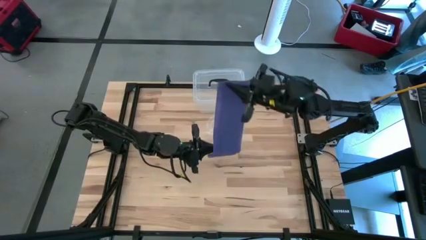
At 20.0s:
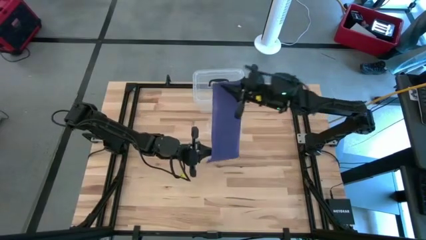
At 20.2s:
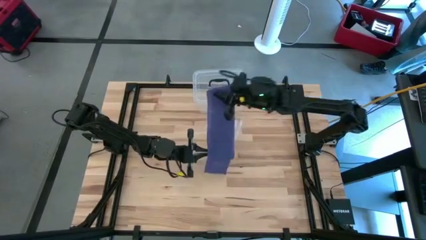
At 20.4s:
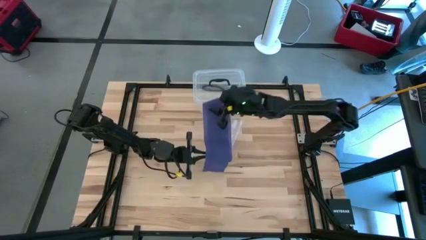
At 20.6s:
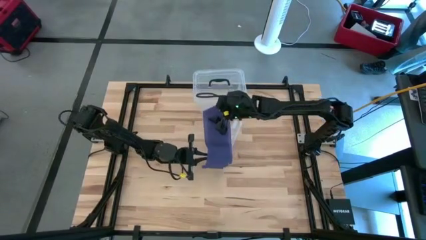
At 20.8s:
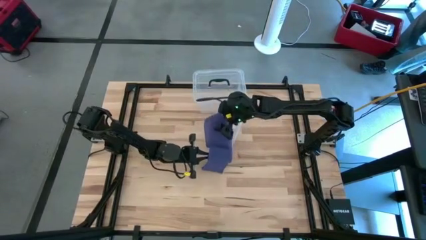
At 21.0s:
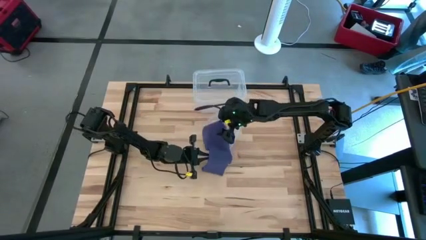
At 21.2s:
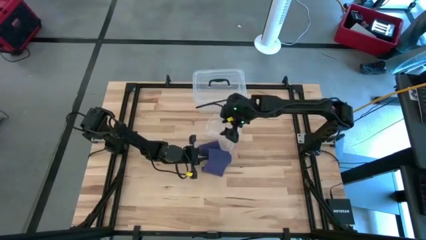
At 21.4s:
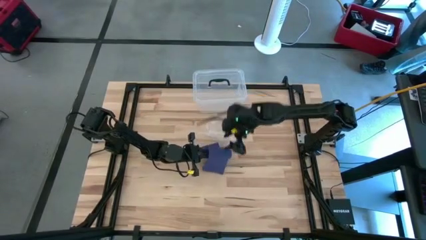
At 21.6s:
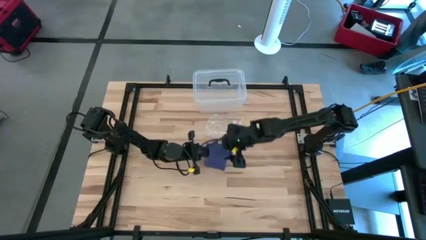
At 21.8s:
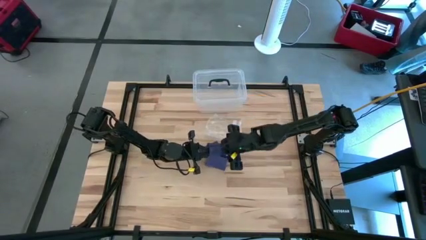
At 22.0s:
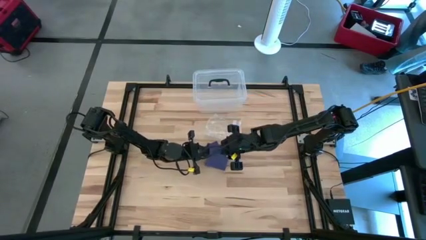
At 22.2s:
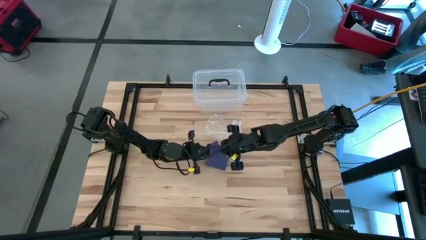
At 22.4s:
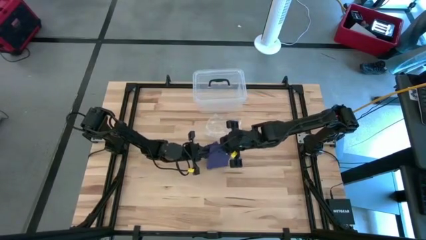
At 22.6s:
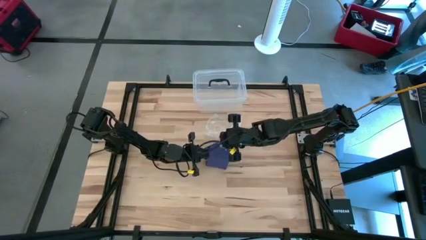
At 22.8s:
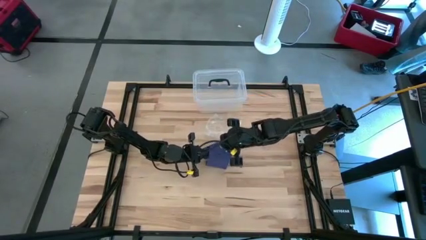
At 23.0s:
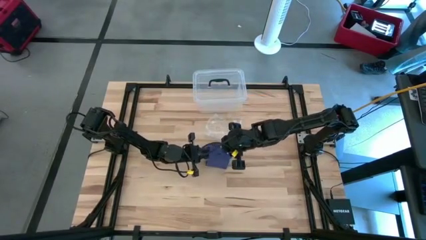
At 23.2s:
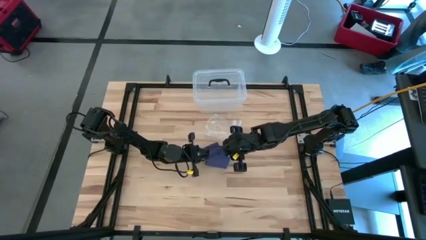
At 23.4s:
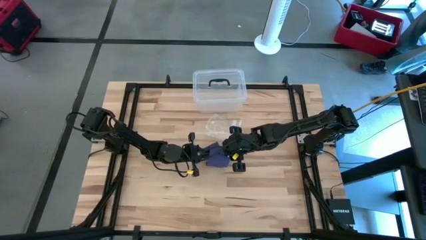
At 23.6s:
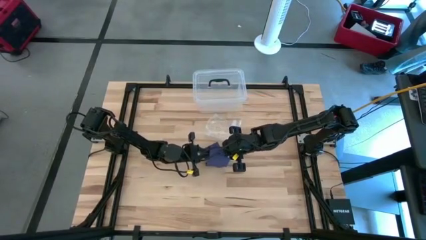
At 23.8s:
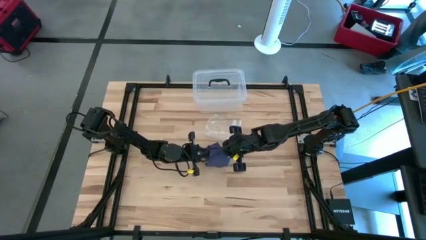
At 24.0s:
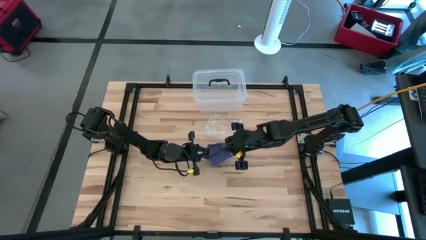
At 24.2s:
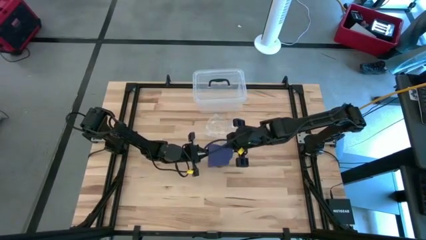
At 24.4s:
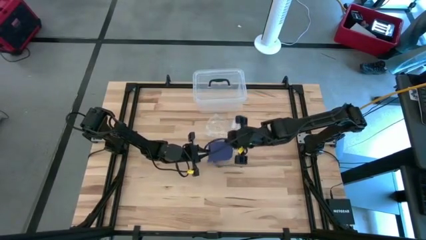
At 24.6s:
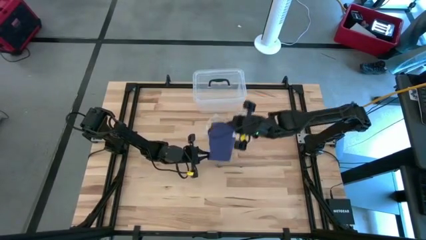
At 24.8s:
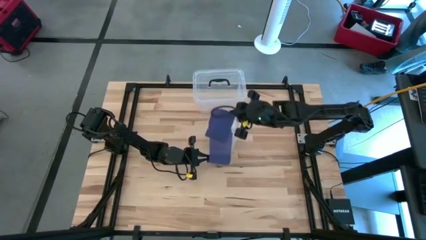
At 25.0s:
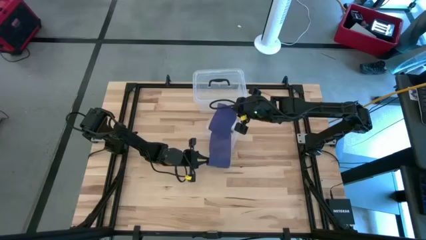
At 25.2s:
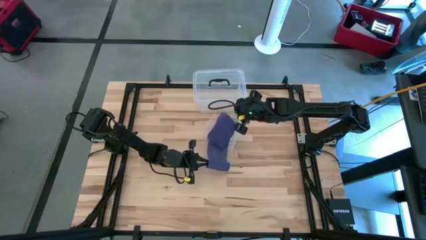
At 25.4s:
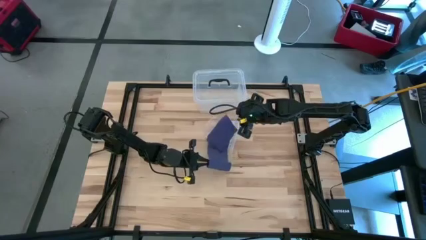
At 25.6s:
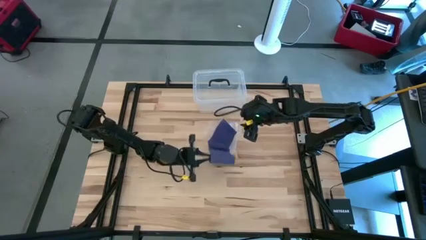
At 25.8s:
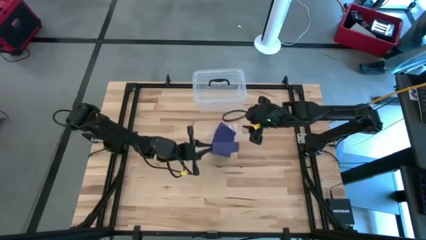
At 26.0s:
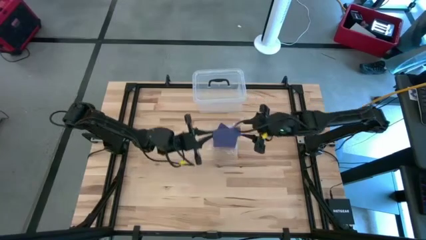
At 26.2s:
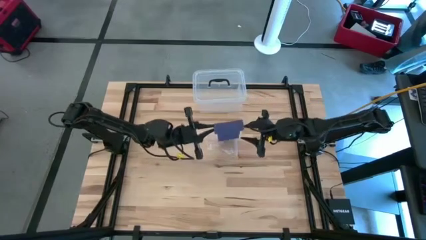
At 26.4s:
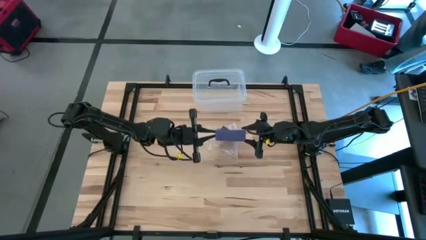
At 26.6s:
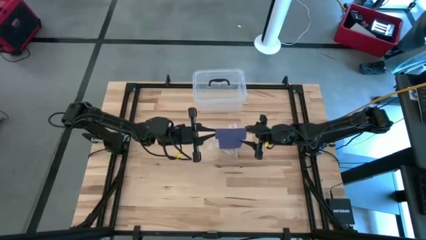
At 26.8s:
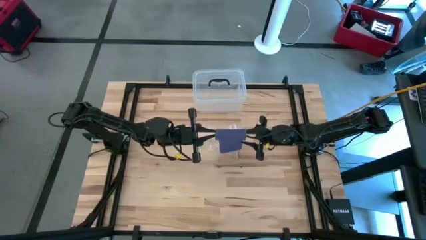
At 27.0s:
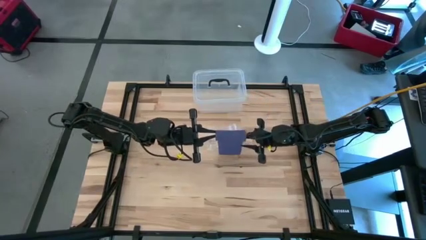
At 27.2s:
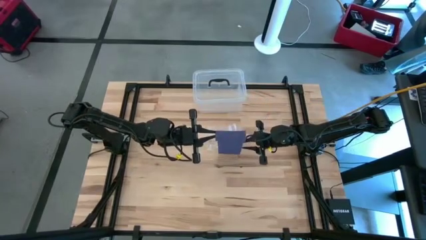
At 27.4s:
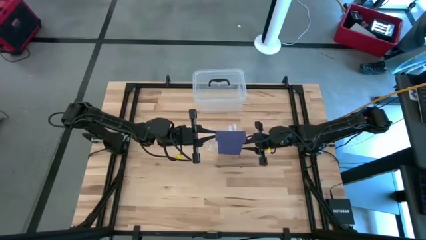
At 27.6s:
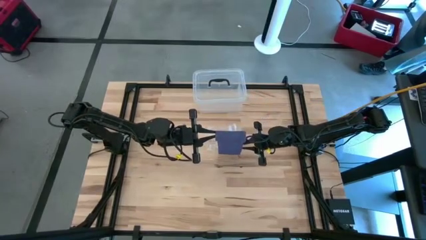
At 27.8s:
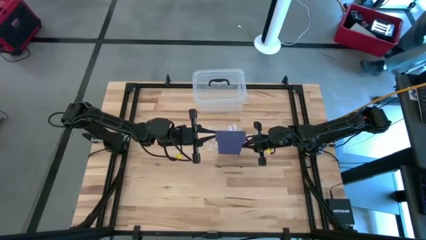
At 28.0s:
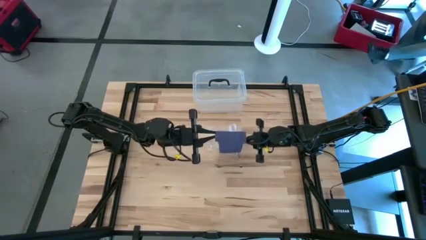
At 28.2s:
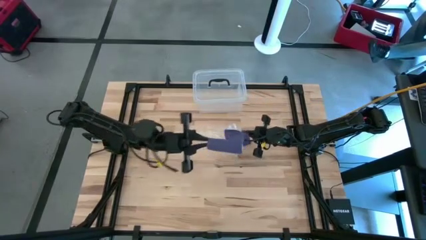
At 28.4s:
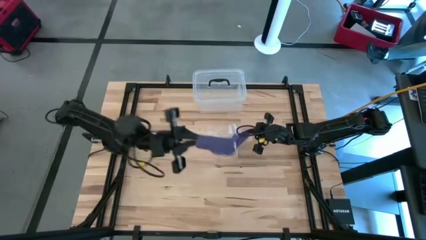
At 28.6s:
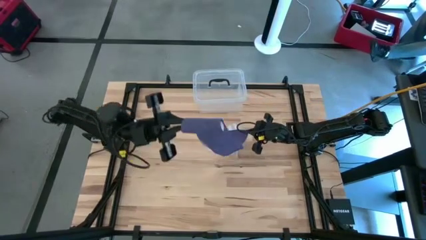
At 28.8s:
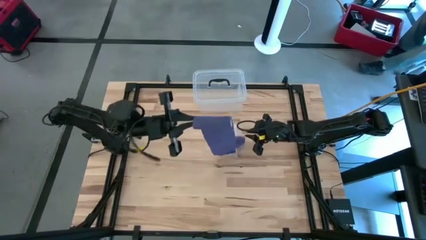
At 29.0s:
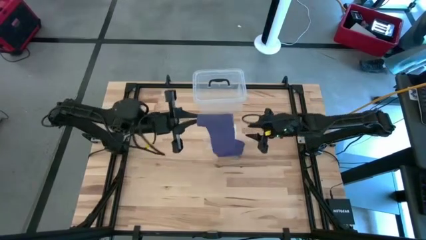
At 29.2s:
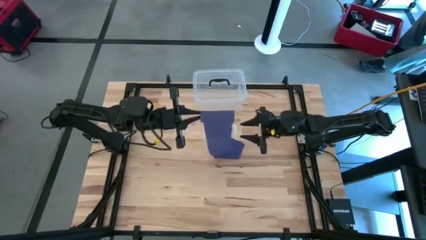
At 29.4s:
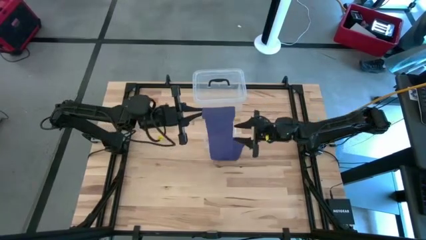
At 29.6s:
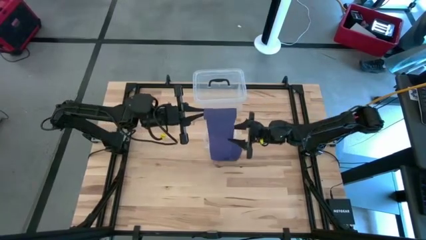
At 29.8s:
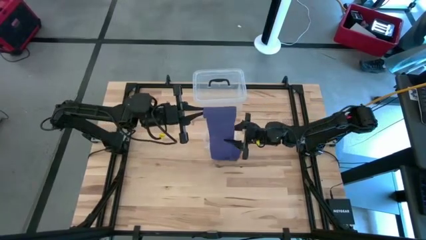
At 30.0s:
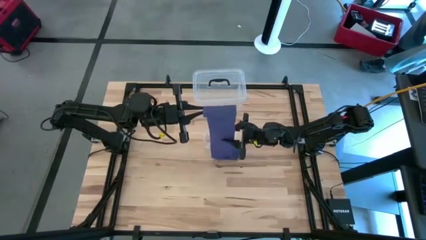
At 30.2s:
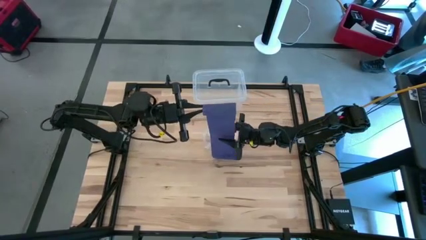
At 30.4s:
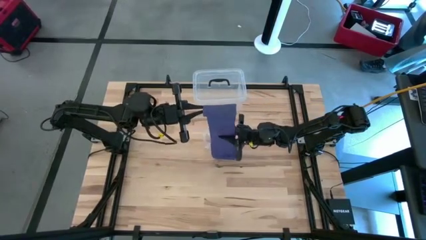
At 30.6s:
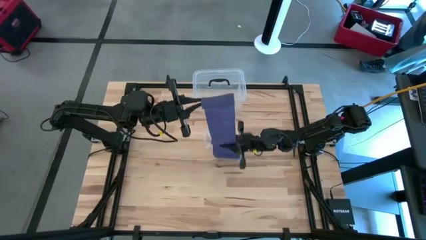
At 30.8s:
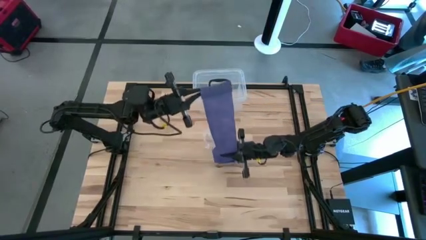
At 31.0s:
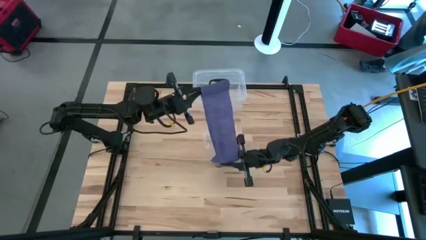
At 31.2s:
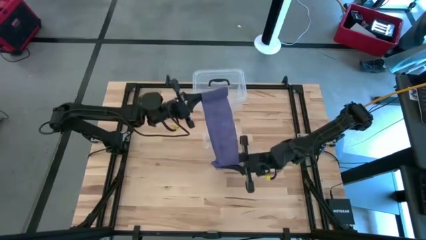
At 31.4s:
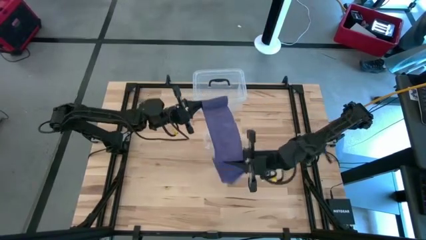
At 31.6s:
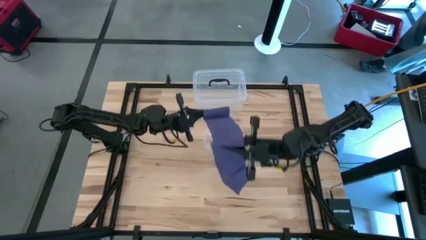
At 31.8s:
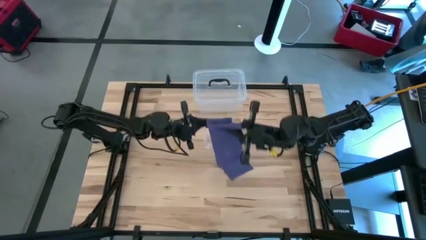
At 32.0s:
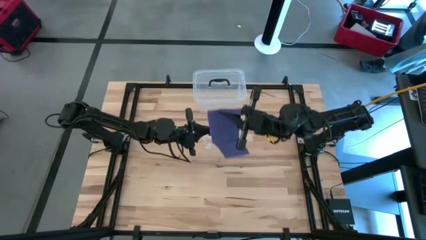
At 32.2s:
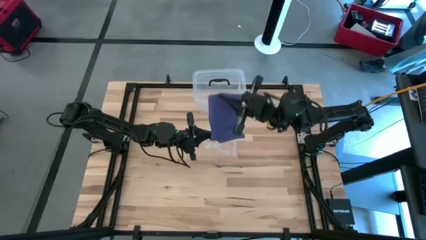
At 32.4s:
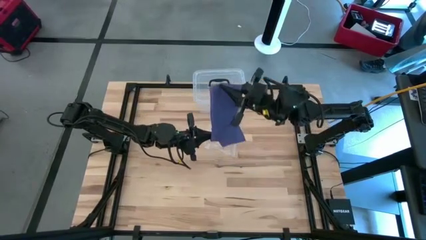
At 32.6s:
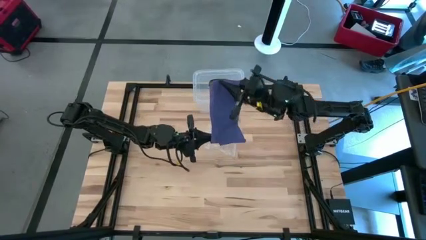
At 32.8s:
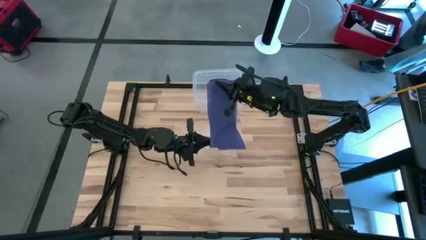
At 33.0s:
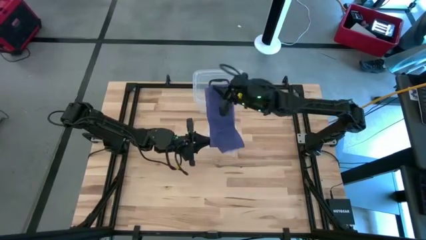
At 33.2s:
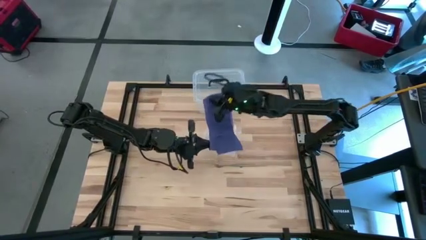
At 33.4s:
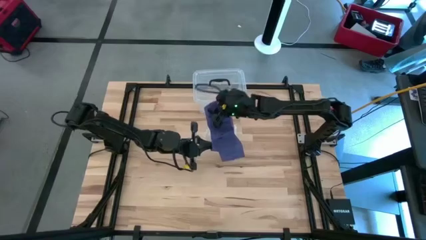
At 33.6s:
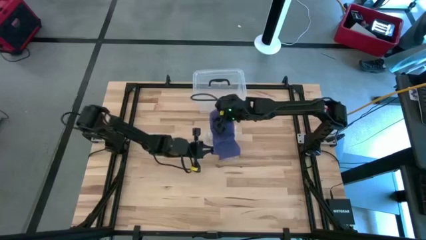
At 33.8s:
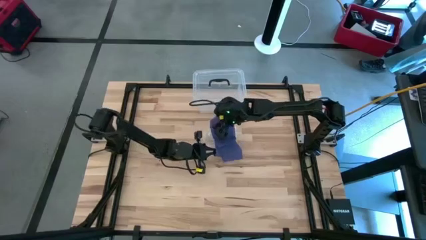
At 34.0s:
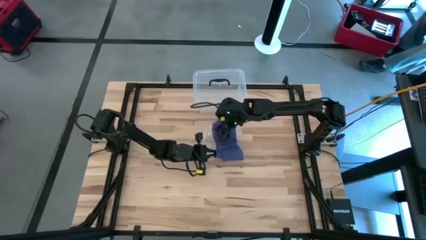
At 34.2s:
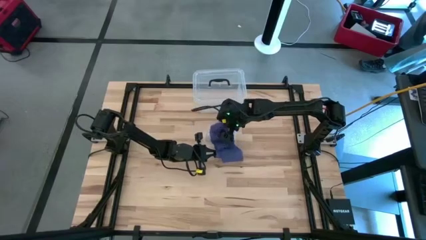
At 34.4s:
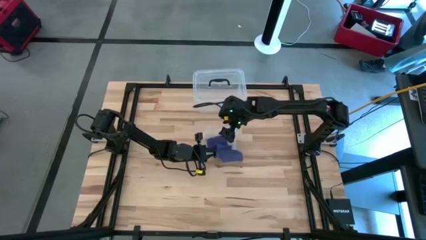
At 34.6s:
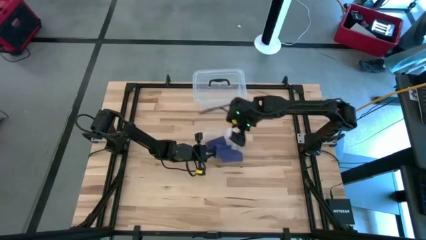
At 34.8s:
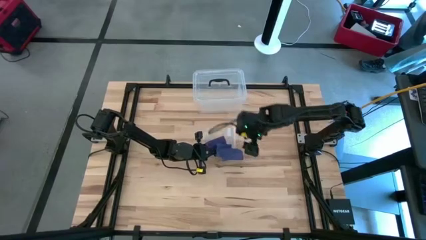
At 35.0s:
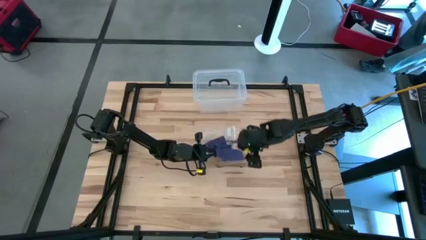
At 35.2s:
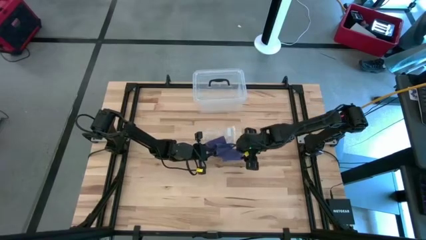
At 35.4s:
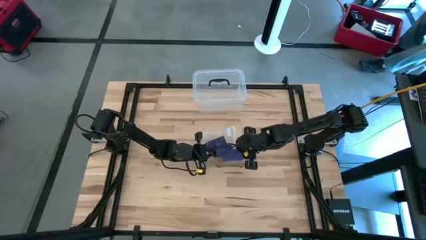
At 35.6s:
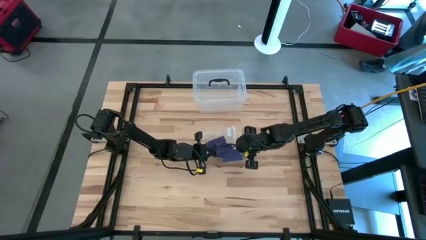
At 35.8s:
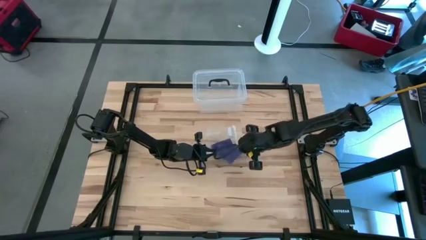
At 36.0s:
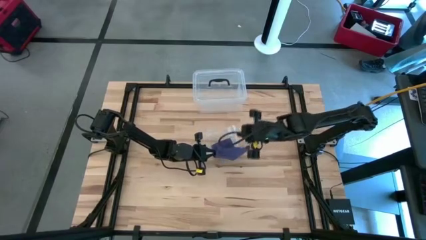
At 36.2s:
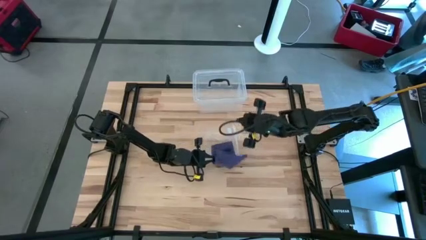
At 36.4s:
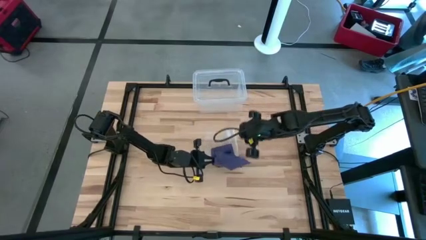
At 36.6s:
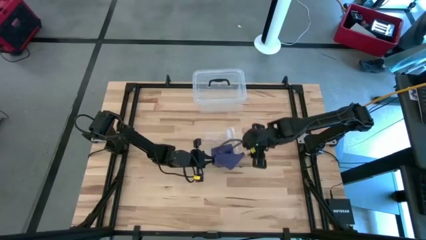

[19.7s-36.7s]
Task: Roll bandage
Roll the violet bandage
